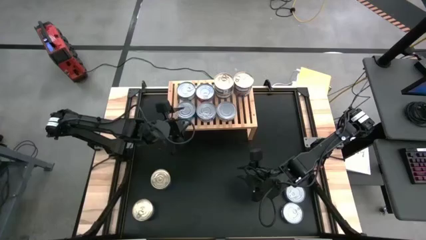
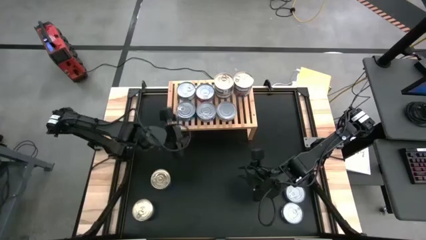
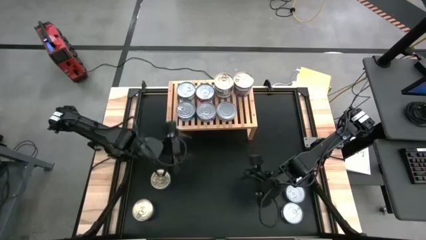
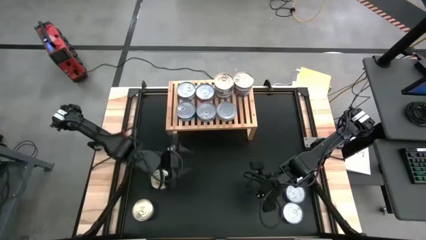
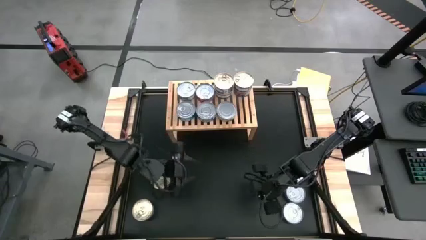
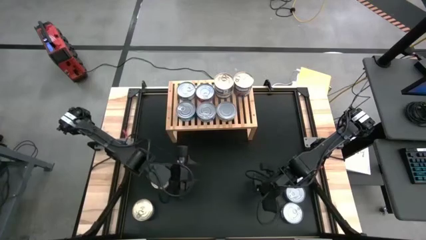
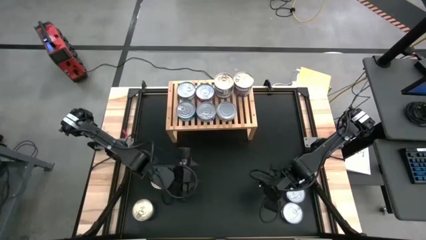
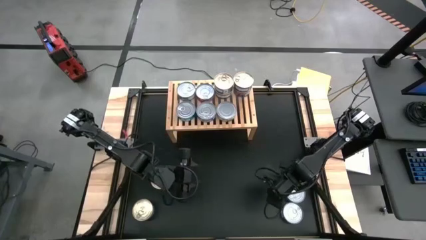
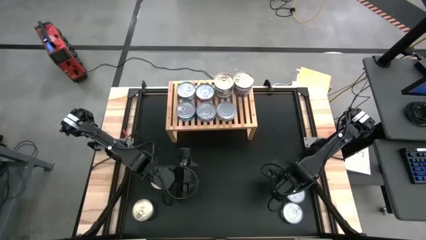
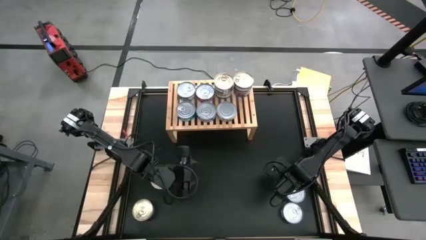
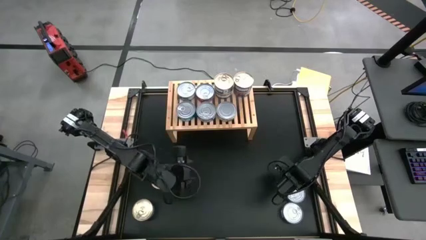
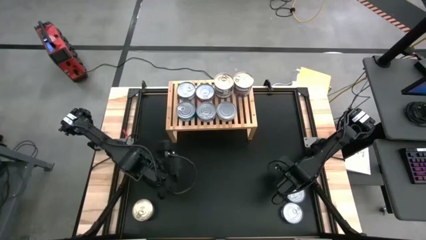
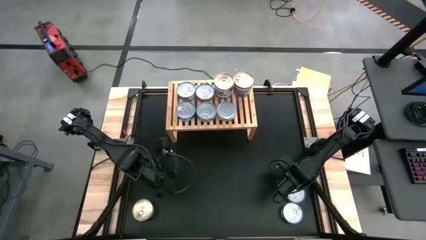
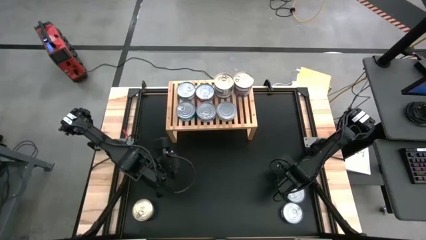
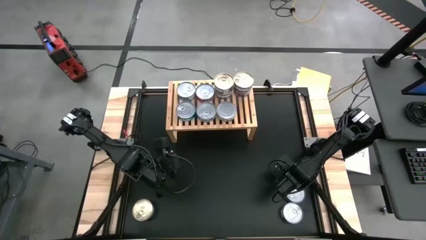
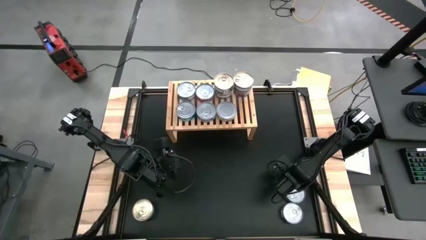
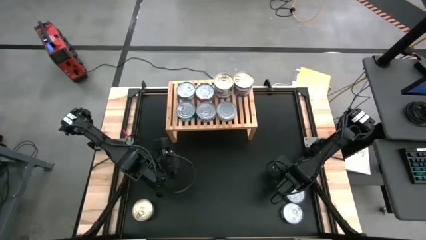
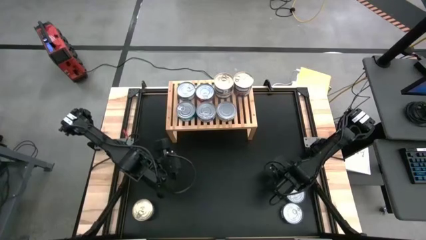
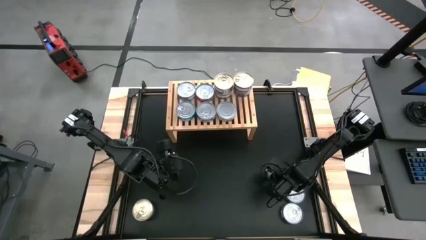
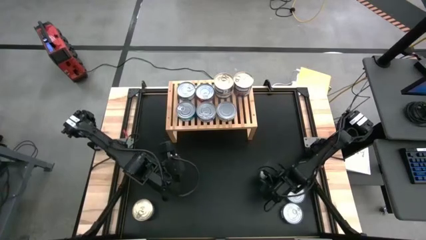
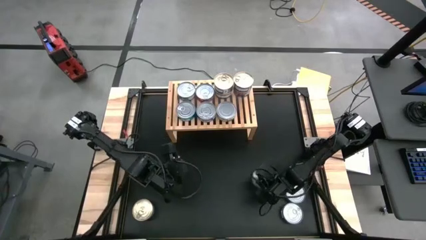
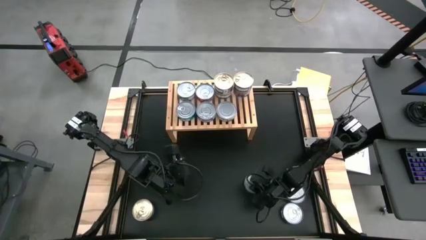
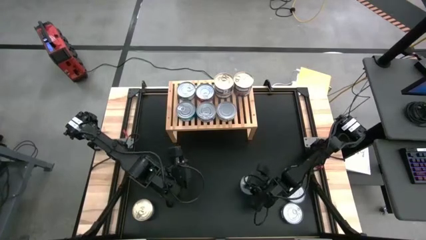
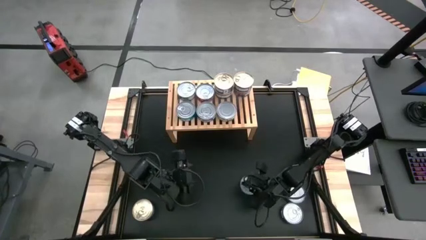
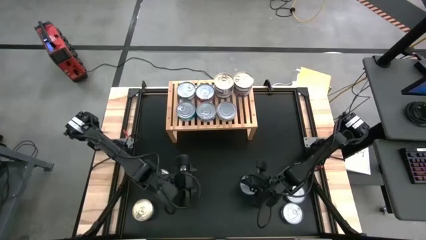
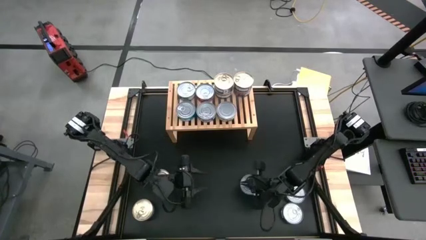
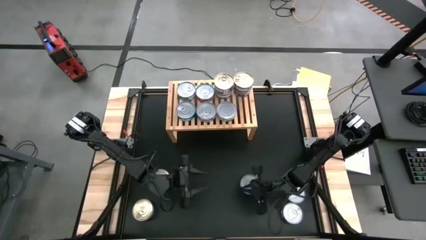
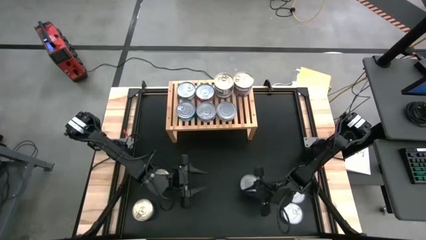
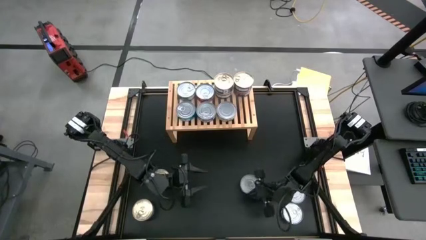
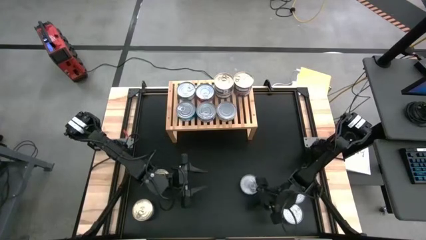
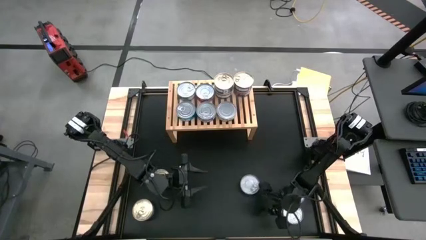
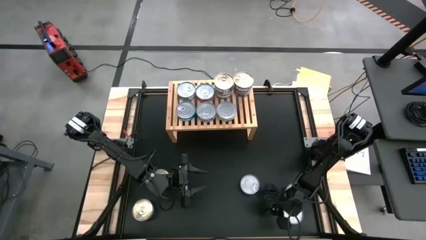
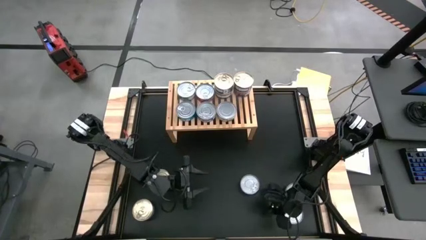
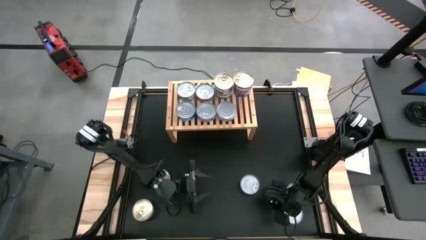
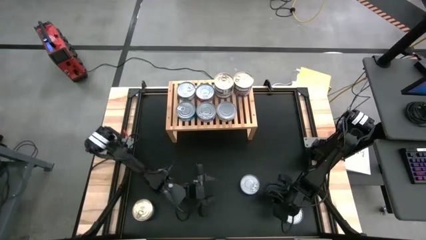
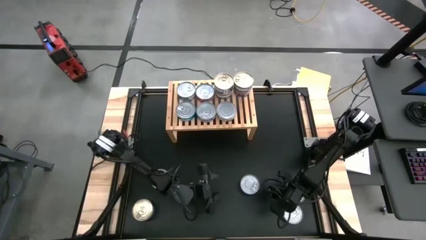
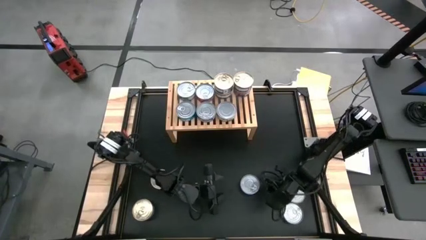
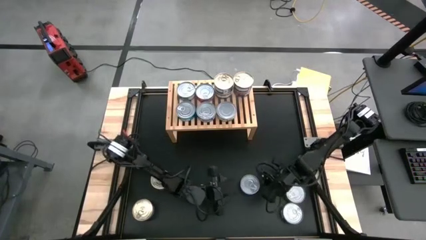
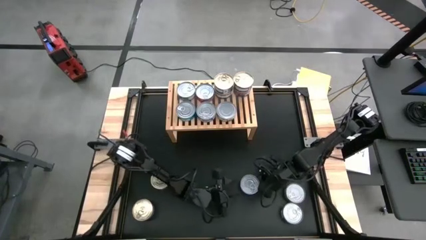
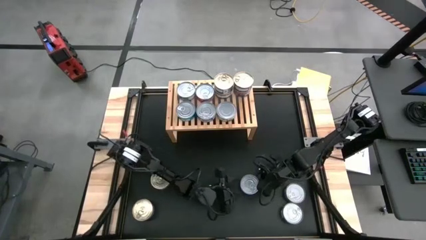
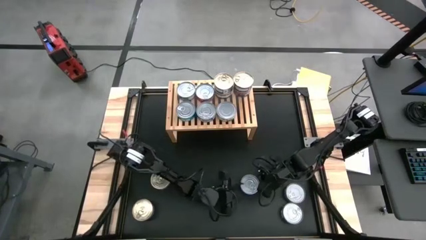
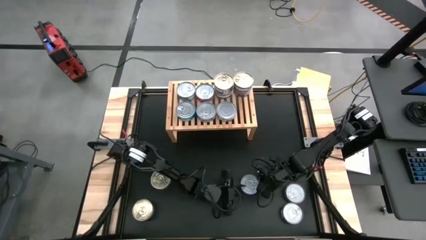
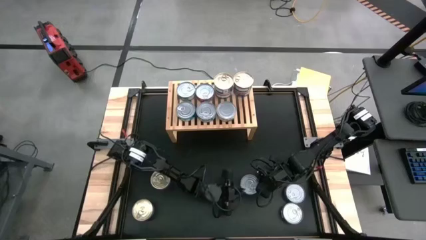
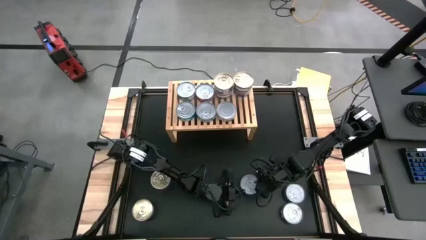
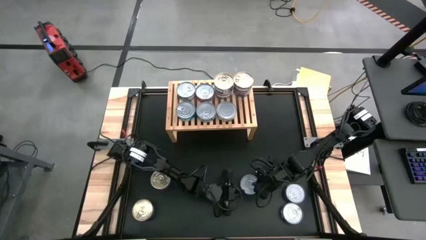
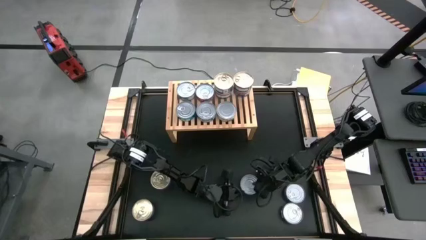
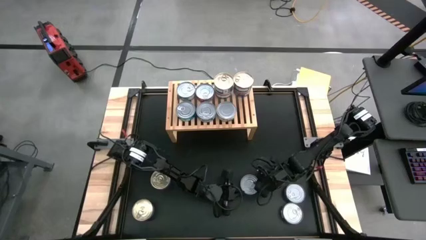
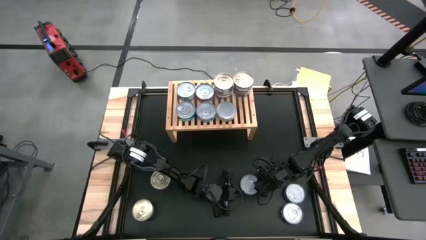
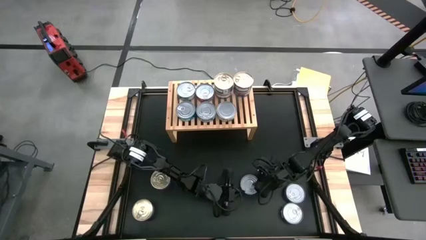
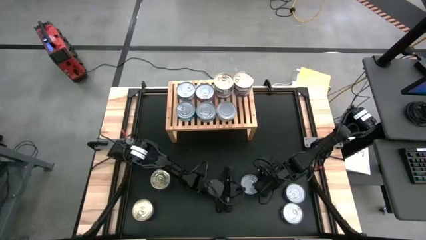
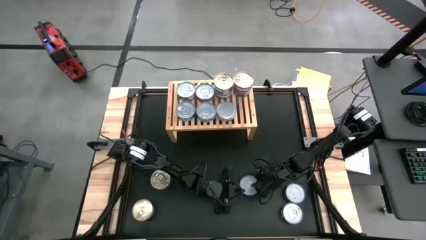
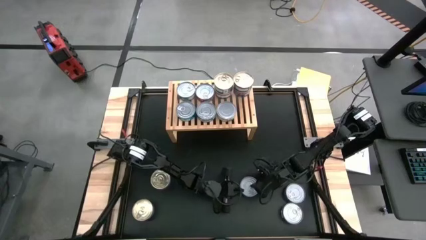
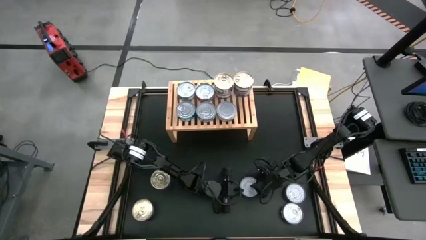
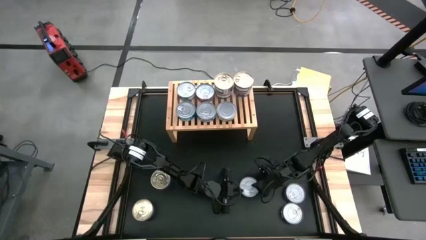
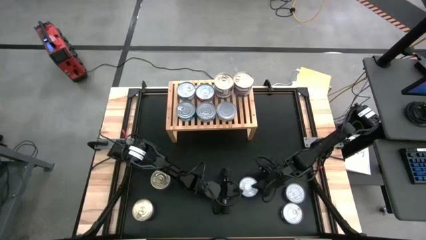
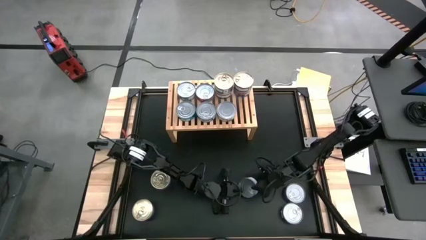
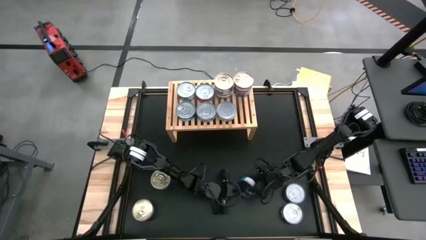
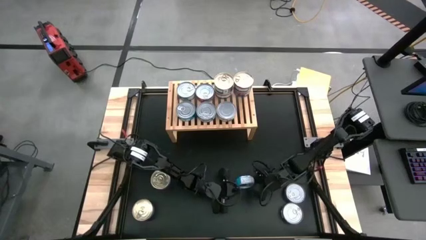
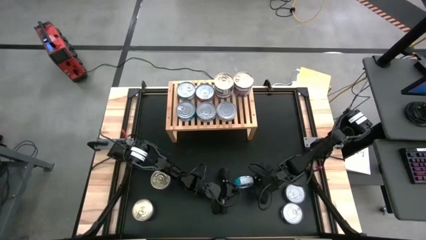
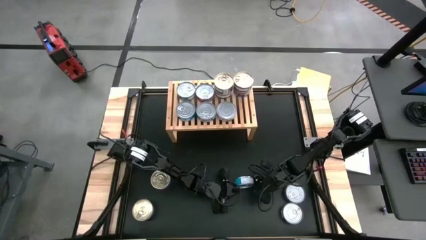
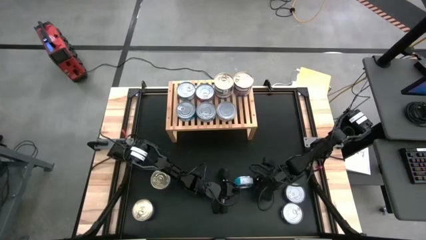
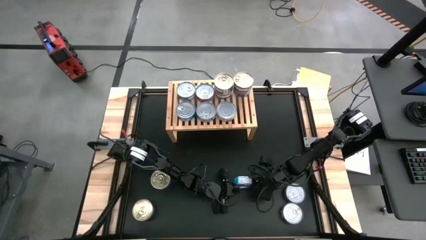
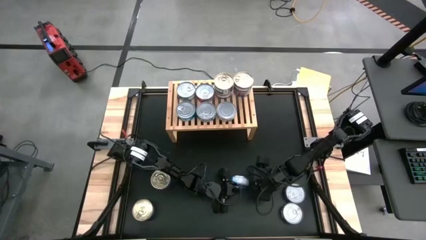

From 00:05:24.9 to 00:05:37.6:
Task: Stack canned seafood by type on shelf
Put the light blue tuna can on the shelf

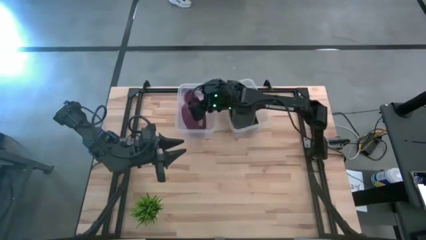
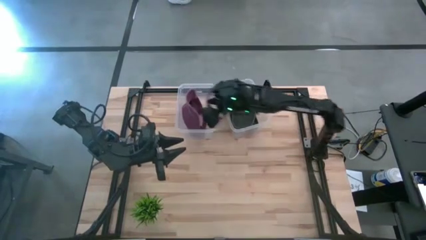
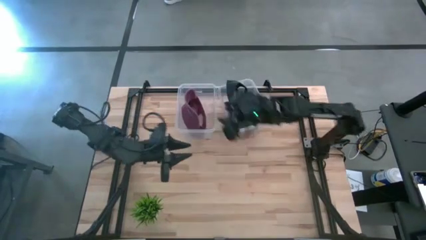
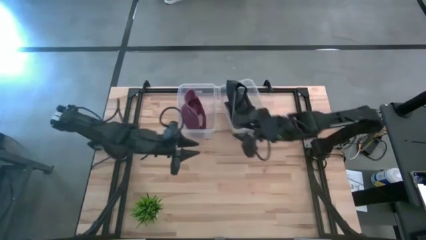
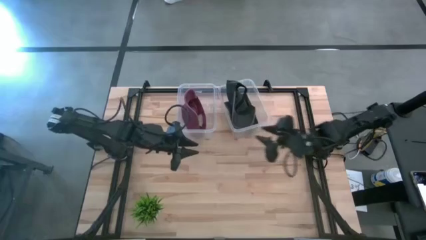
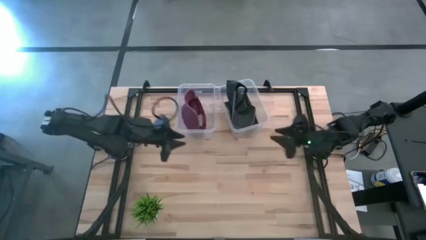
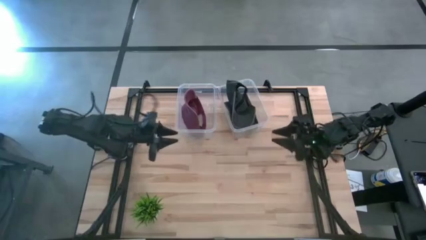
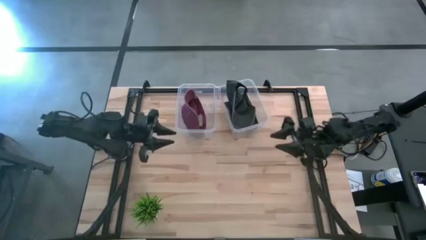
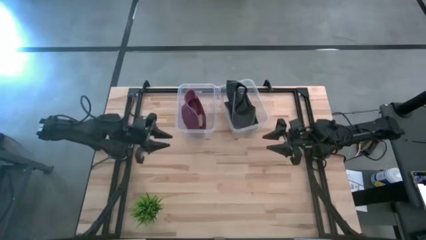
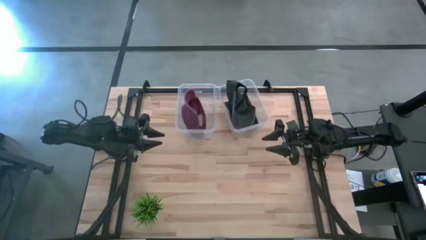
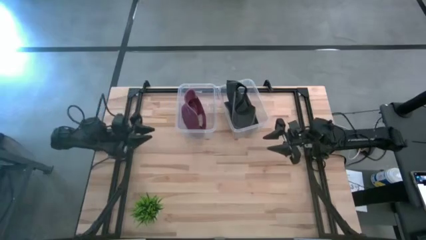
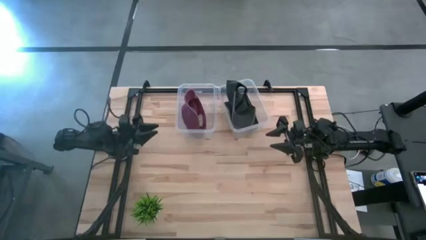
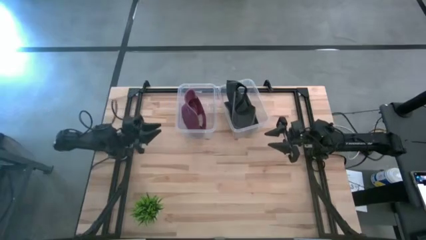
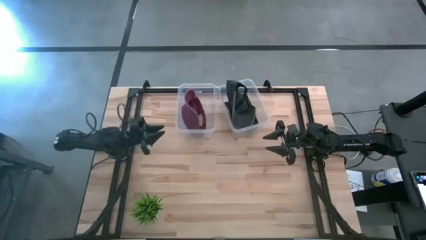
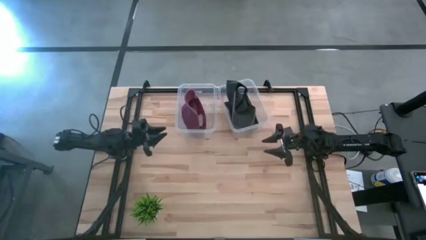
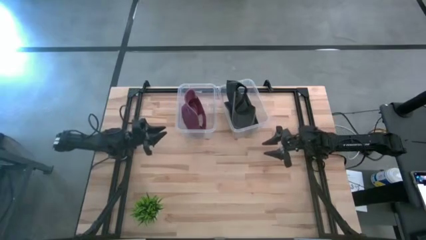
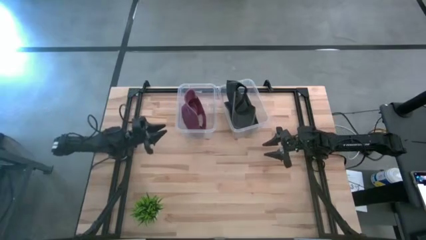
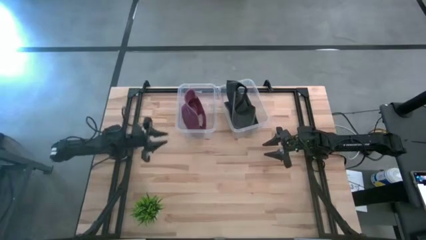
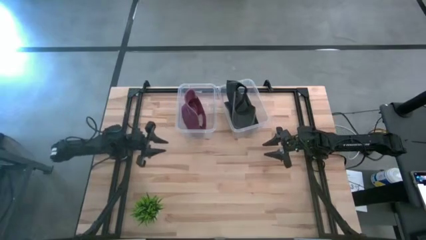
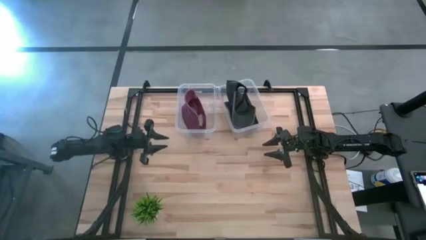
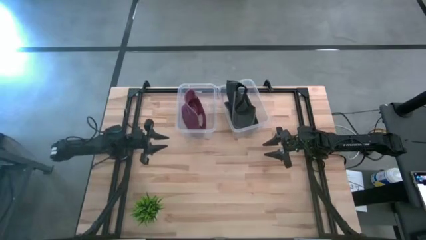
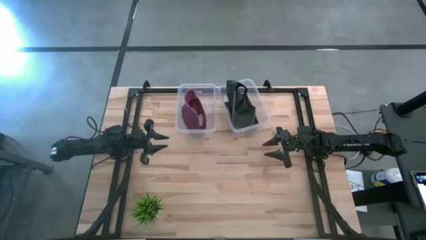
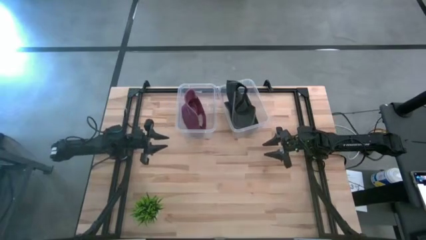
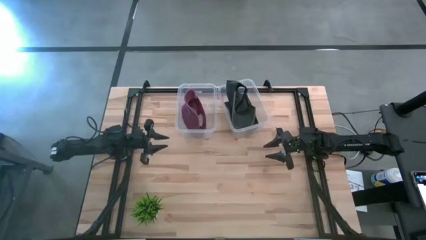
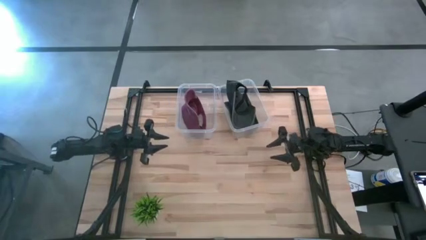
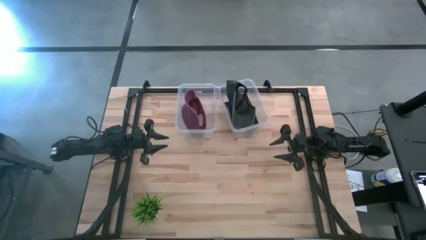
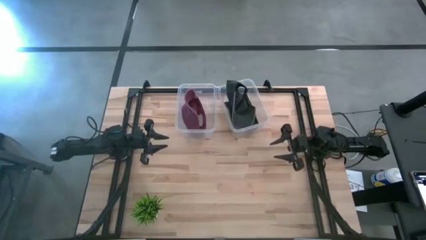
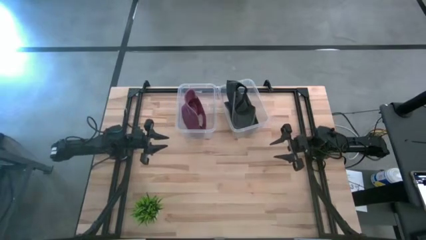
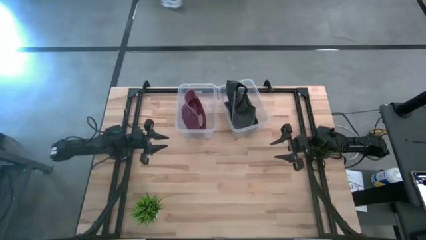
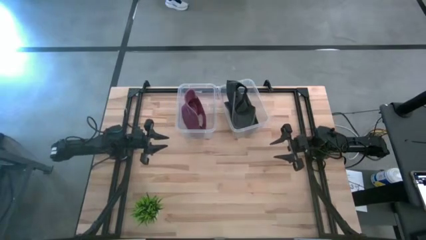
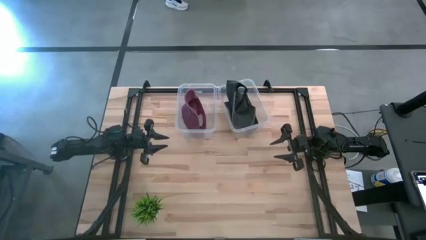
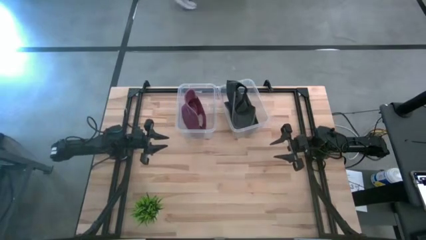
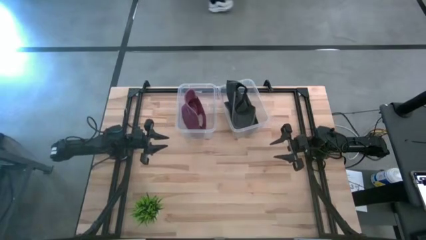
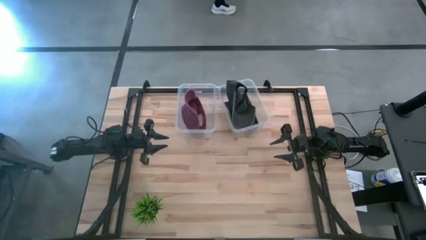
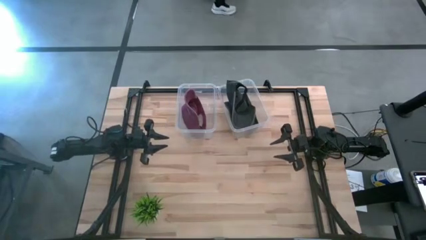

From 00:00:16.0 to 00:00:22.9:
Task: Pick & Place hat
Return to Home Position
